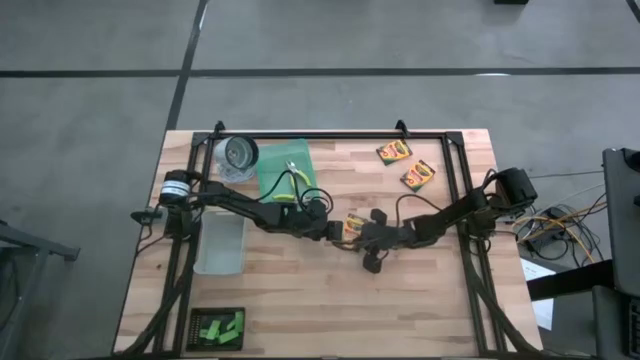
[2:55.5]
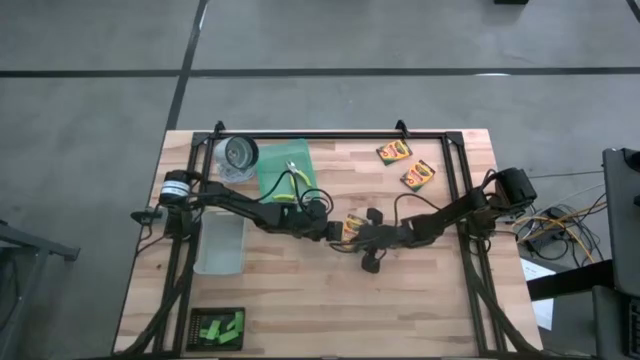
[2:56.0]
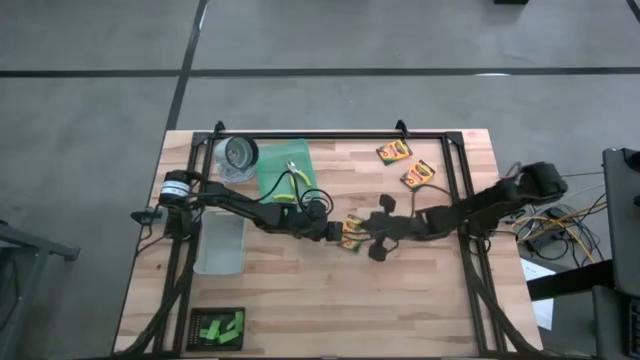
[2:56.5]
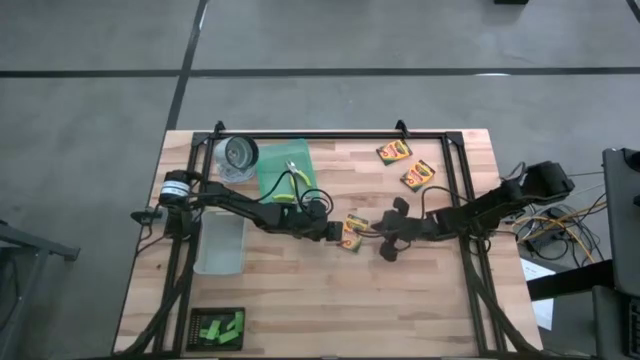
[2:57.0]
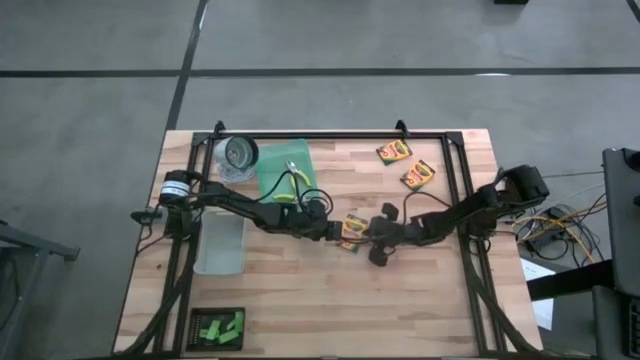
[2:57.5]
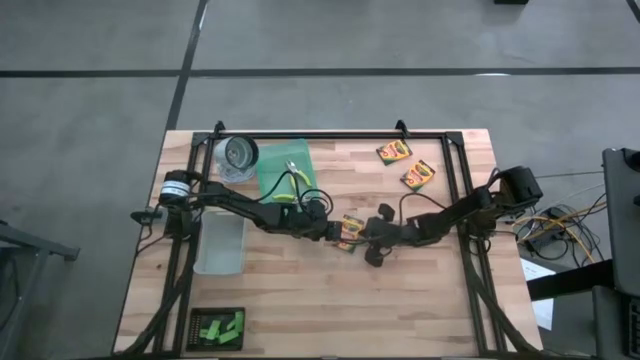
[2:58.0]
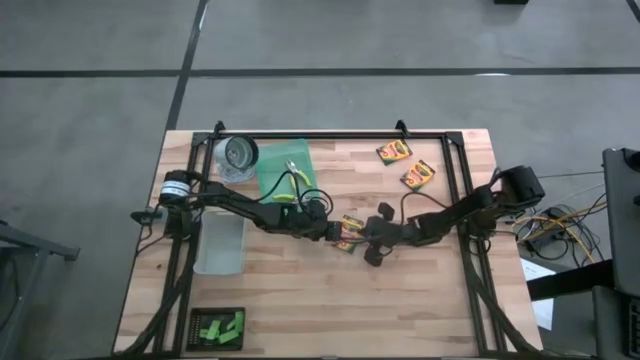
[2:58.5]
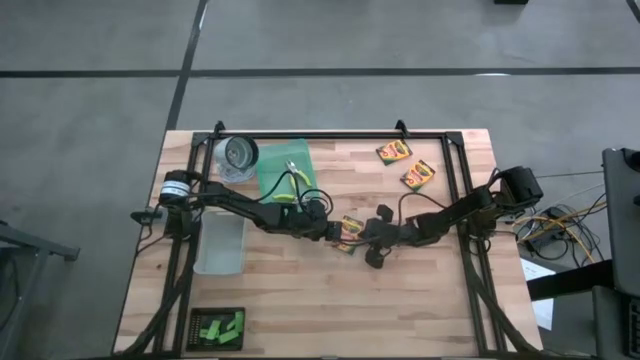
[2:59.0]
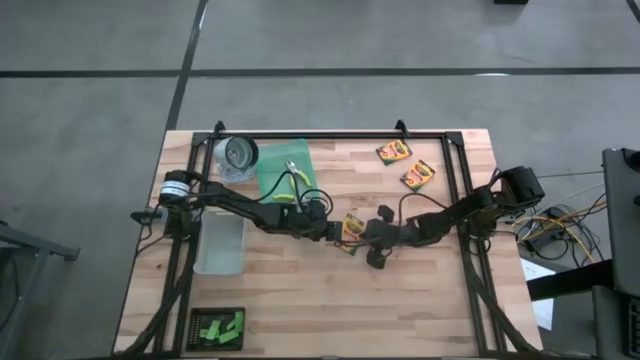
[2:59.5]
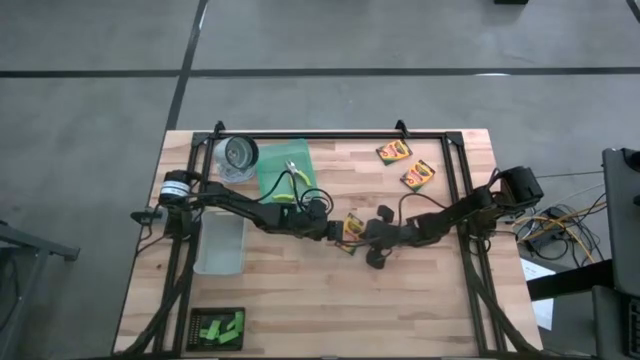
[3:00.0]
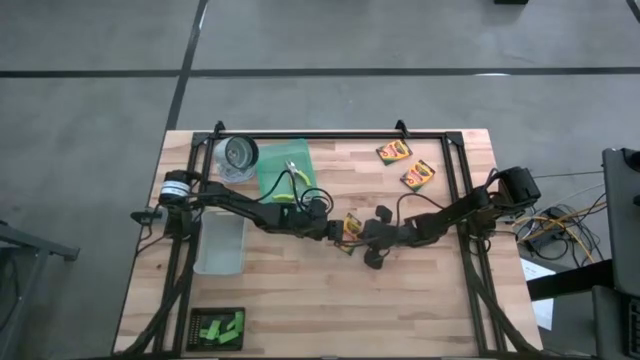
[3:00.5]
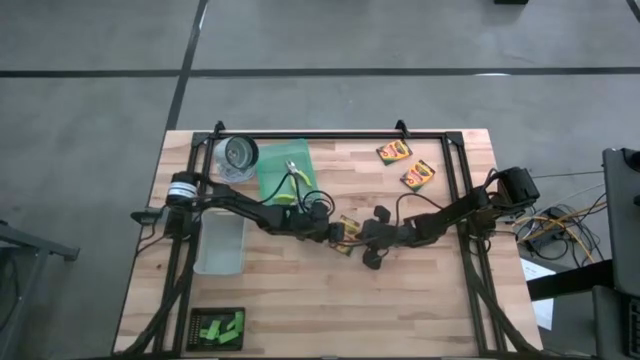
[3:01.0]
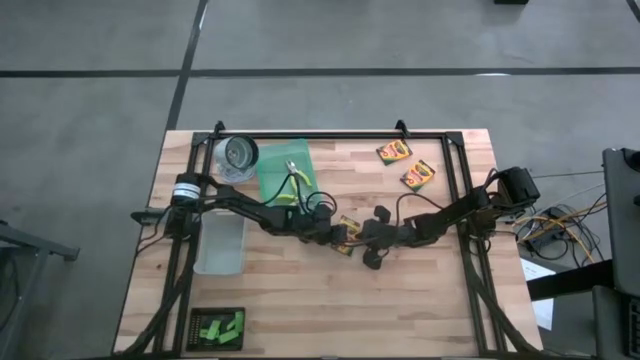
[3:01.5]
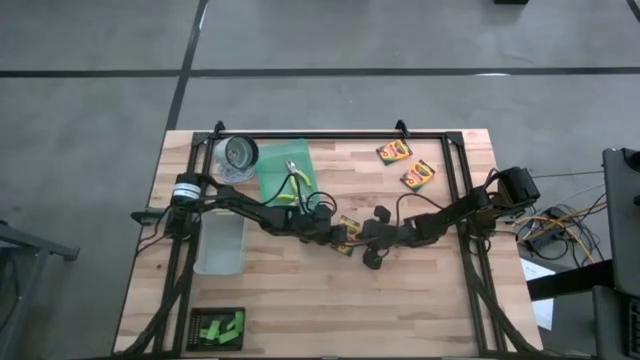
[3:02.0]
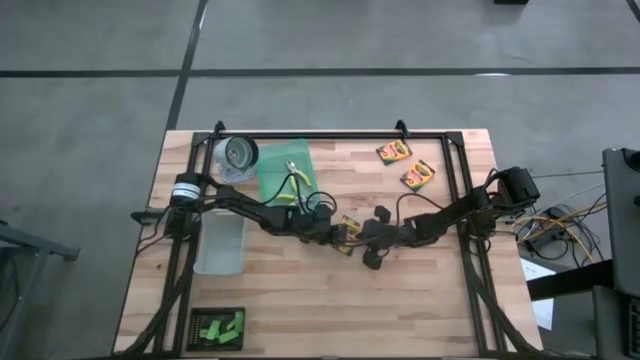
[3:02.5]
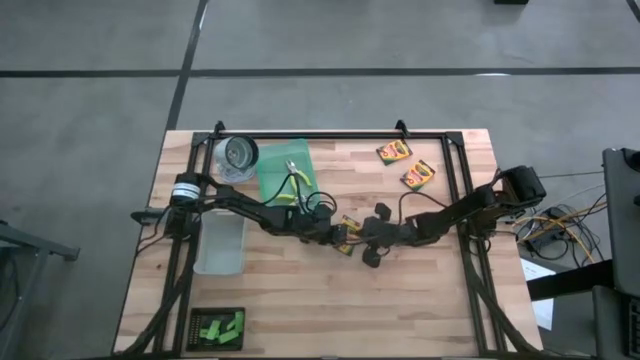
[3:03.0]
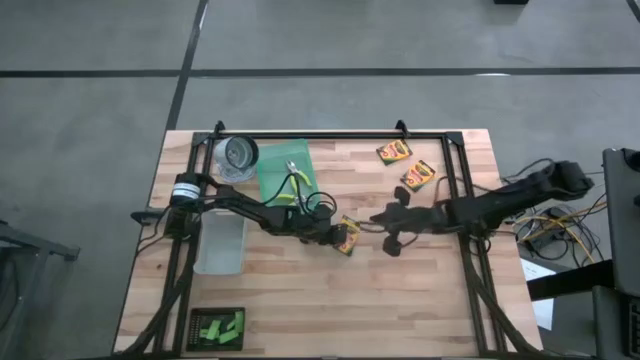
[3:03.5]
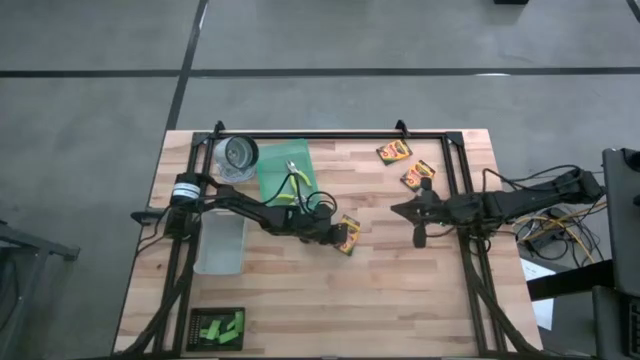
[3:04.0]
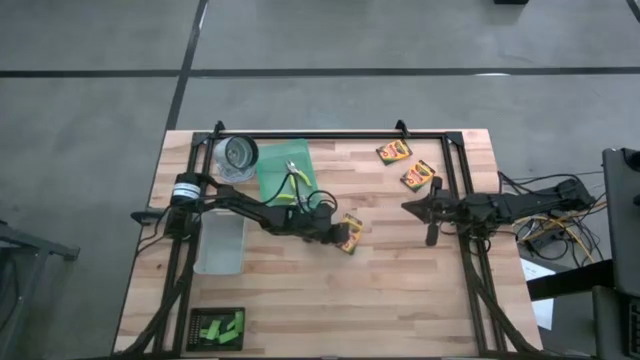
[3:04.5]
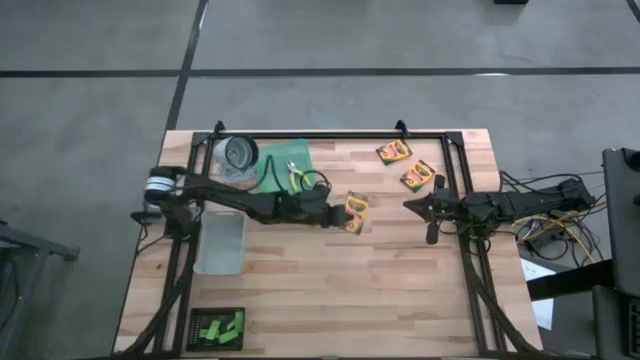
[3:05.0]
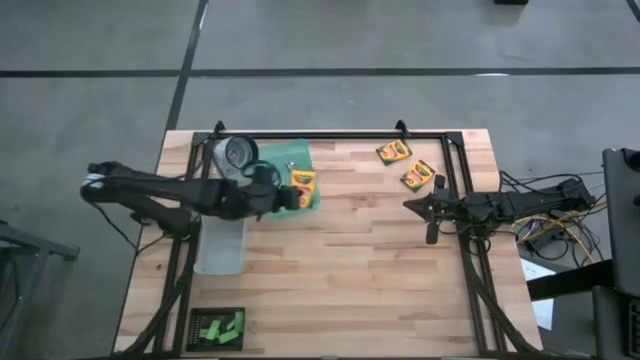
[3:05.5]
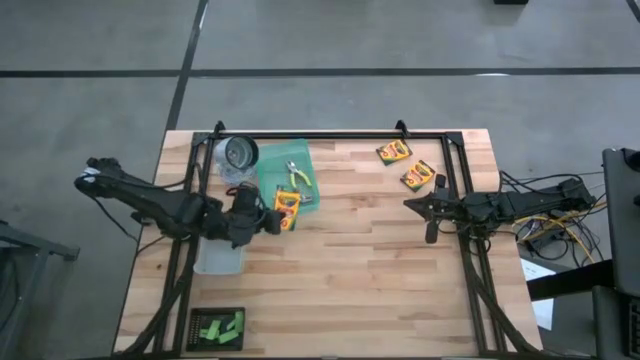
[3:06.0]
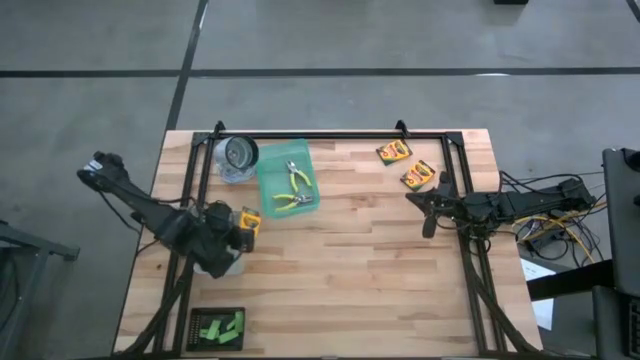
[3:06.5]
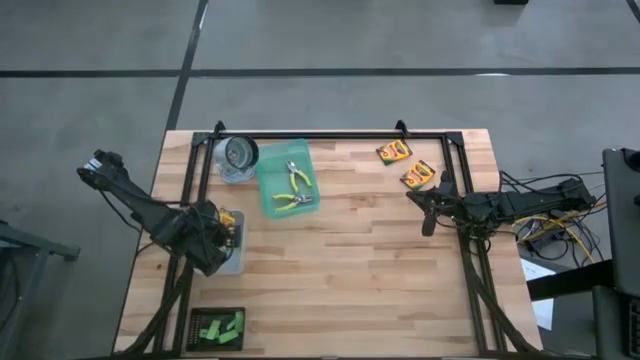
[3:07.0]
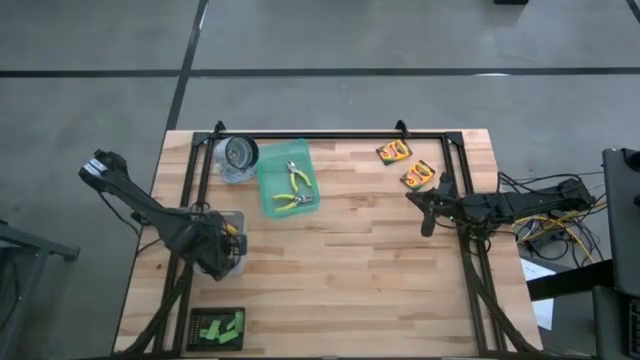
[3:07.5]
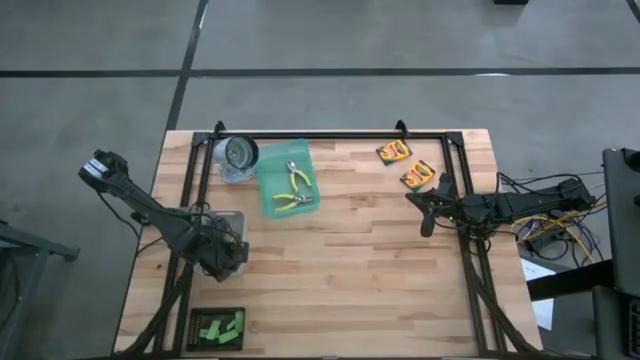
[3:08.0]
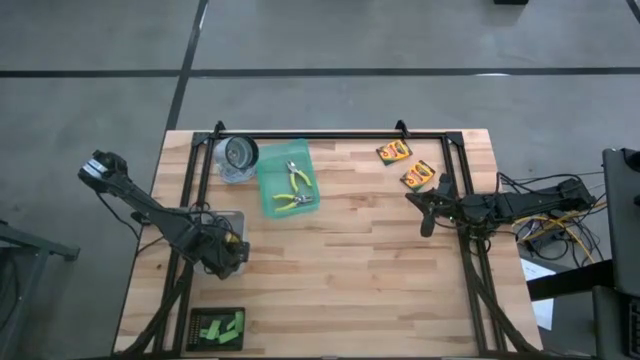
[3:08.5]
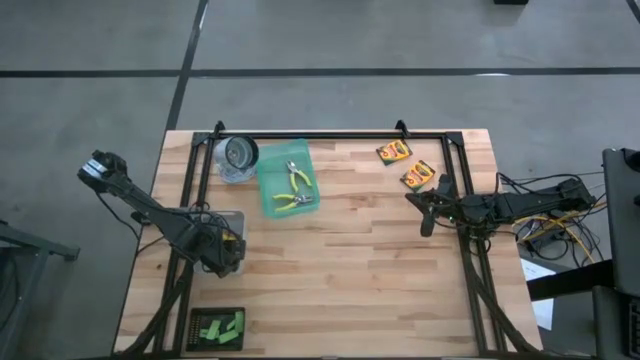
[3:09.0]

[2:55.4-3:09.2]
Task: Pick & Place School Supplies
Put the yellow crayon box into the gray bin

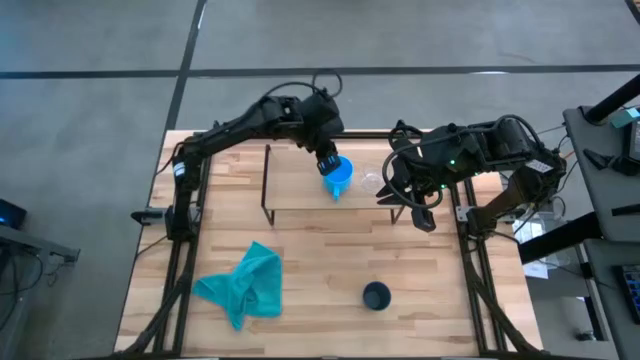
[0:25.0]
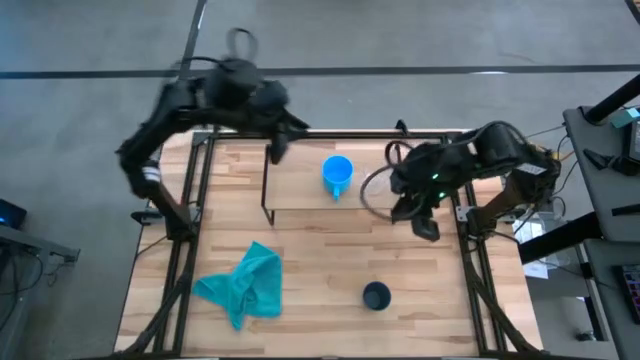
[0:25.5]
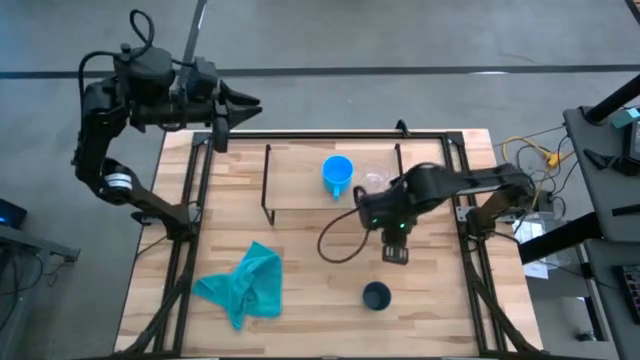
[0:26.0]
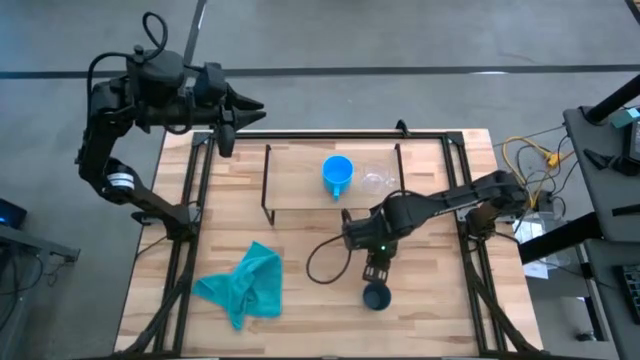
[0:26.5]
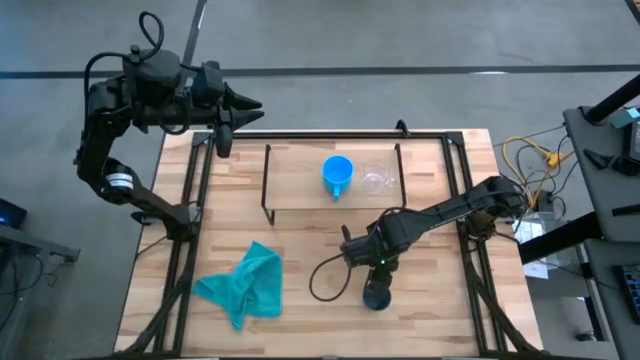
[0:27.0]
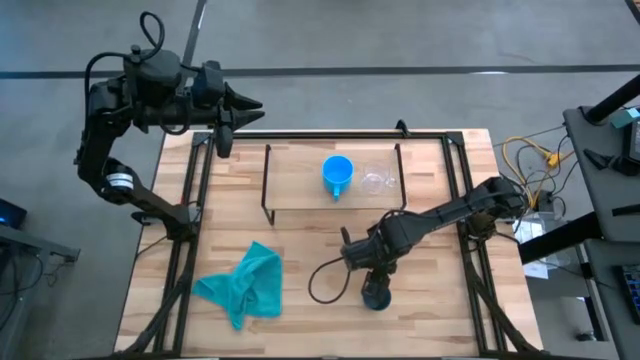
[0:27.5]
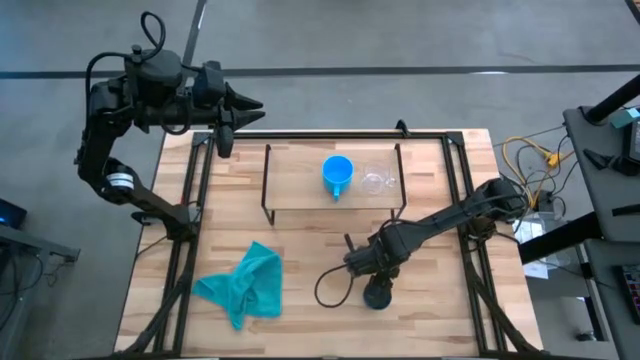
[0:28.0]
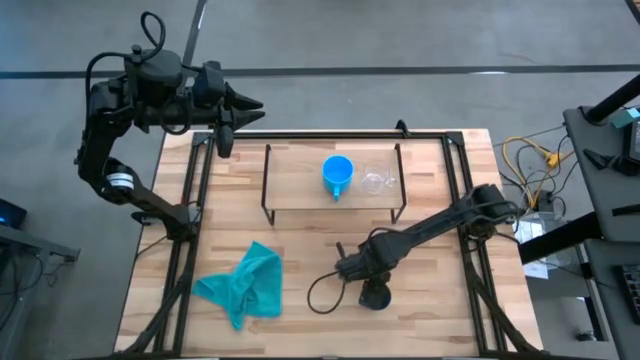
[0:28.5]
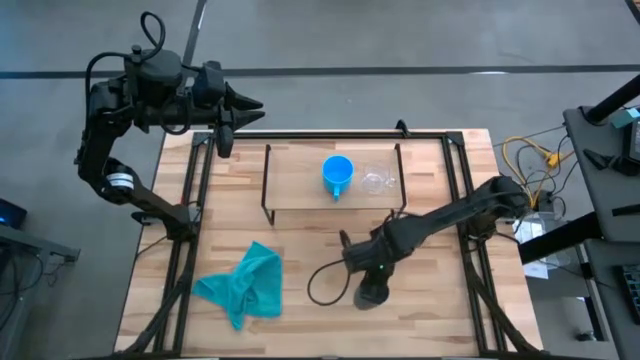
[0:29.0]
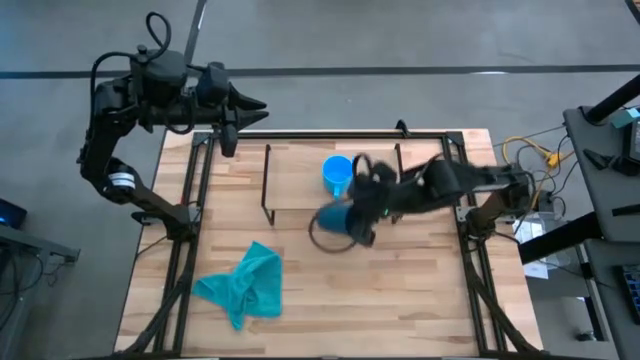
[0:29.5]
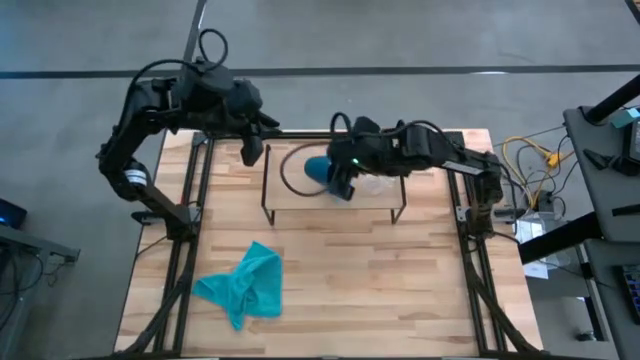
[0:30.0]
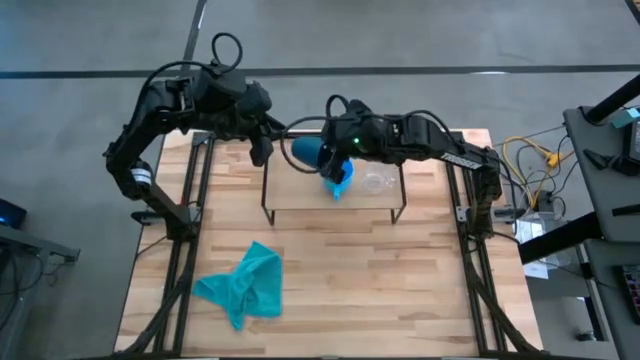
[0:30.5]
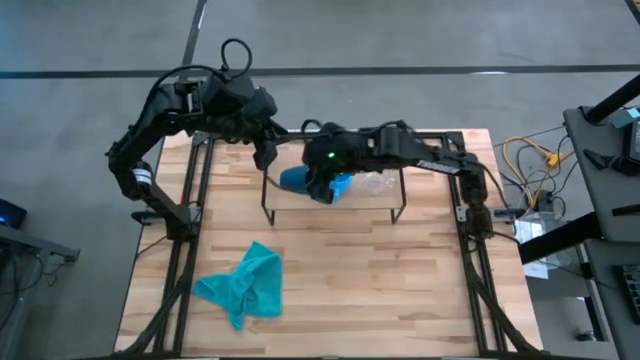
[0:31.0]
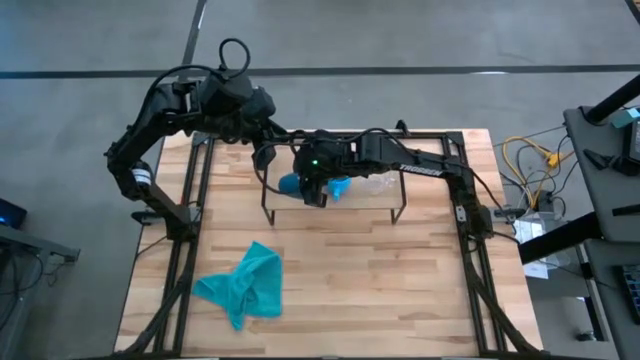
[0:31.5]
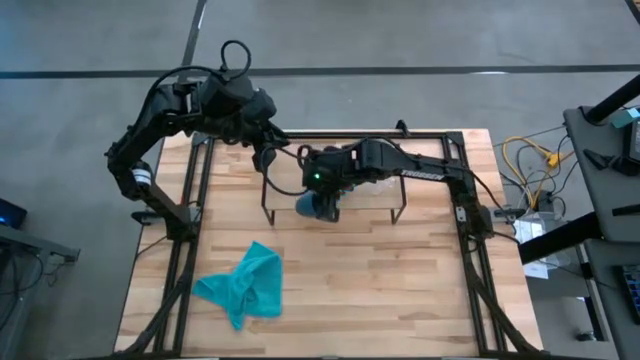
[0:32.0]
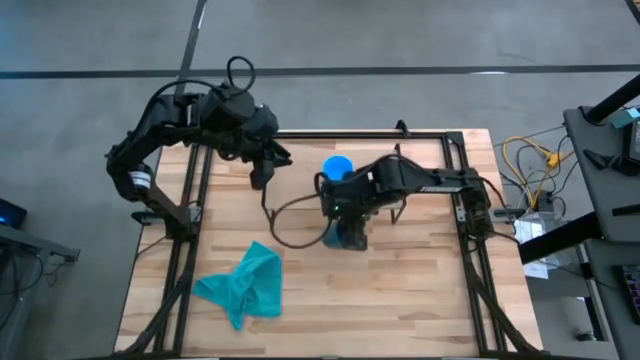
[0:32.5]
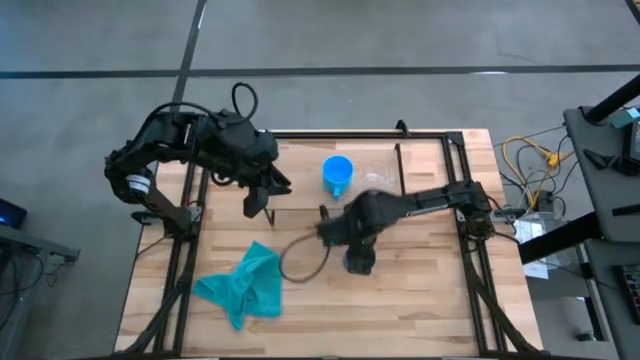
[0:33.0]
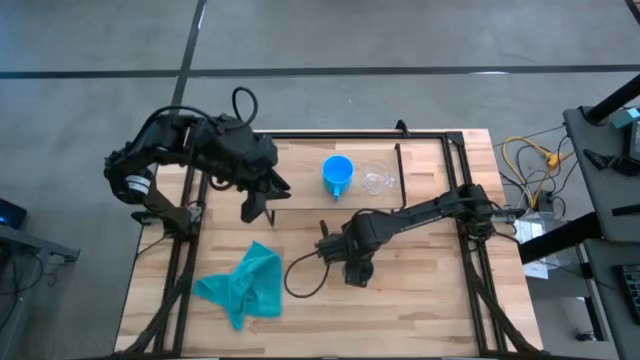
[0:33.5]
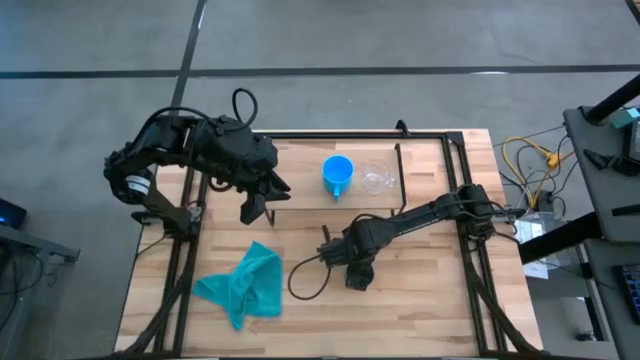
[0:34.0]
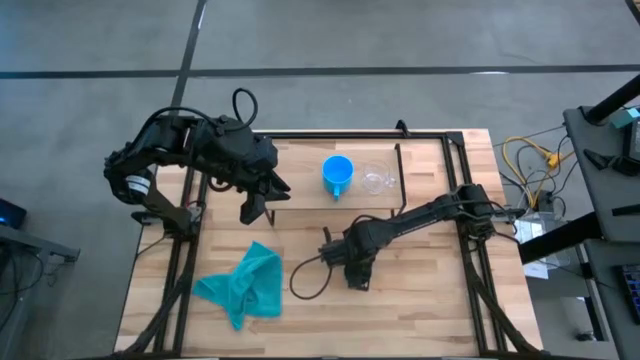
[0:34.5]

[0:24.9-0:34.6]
Task: Stack small to large cups/mugs on shelf
Put the blue cup on the shelf
